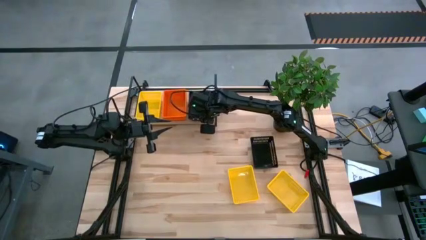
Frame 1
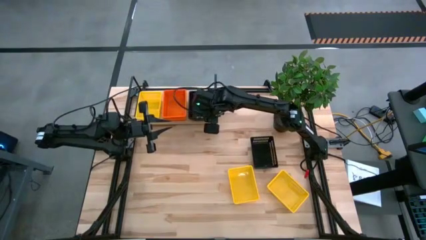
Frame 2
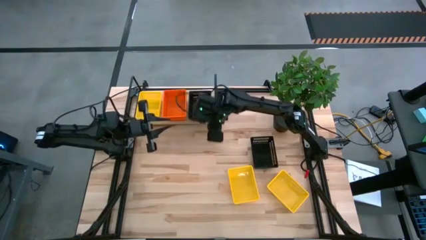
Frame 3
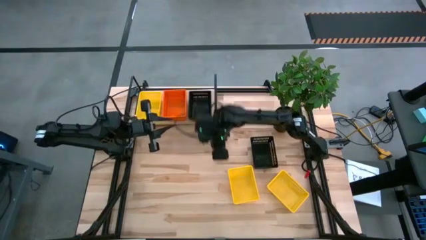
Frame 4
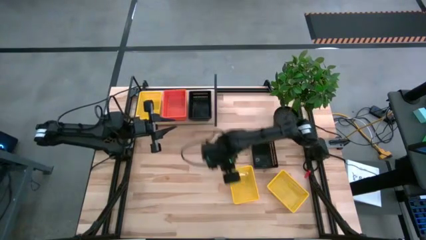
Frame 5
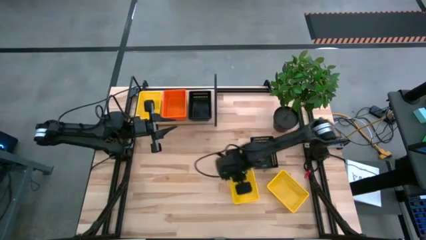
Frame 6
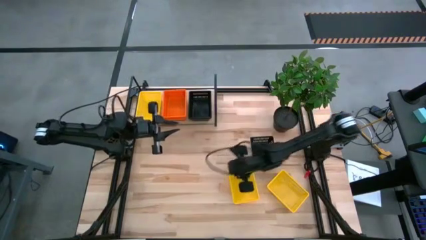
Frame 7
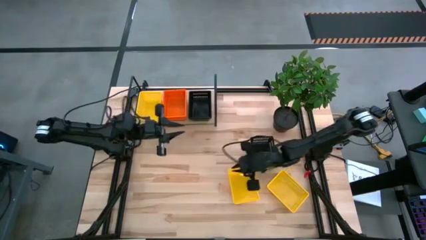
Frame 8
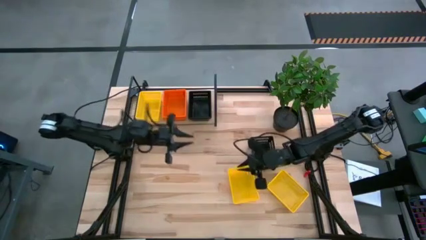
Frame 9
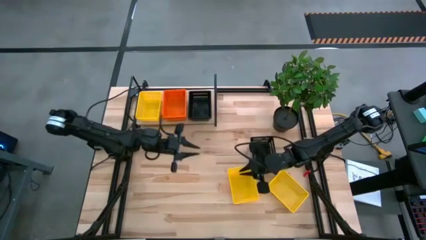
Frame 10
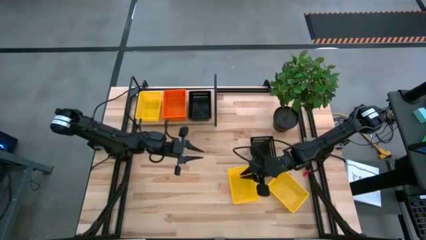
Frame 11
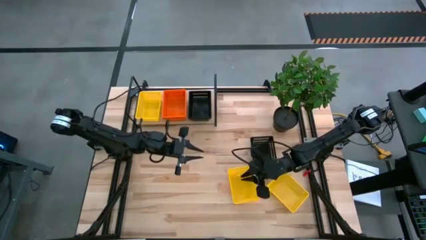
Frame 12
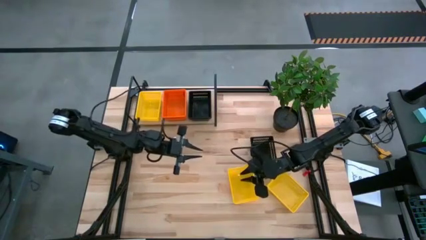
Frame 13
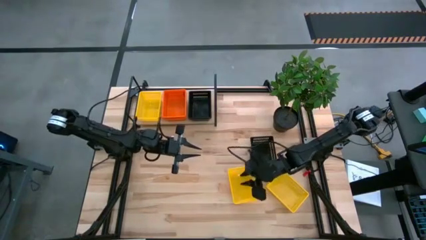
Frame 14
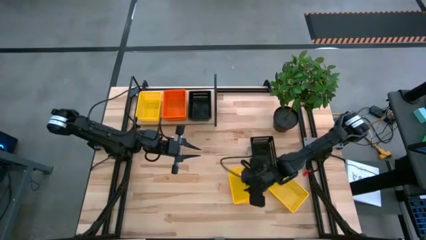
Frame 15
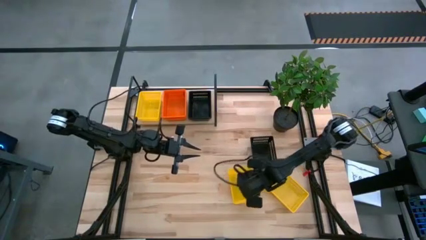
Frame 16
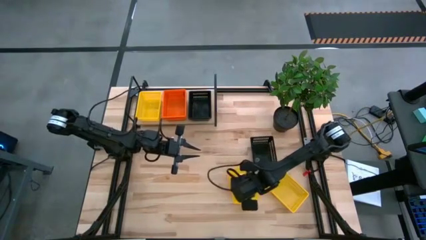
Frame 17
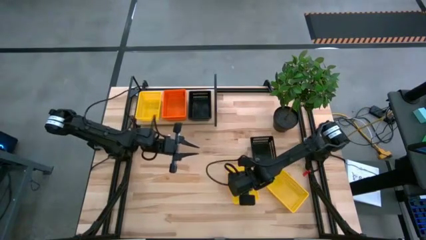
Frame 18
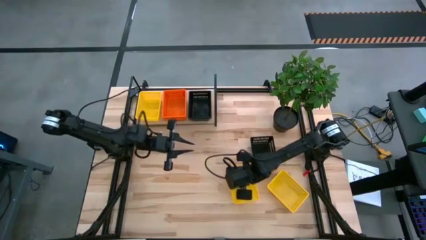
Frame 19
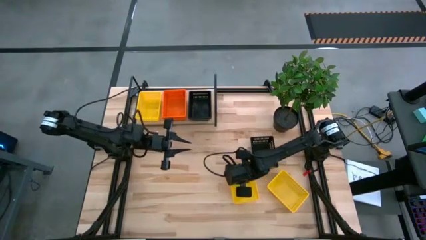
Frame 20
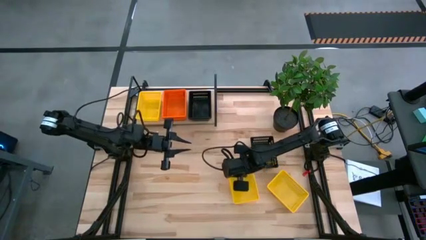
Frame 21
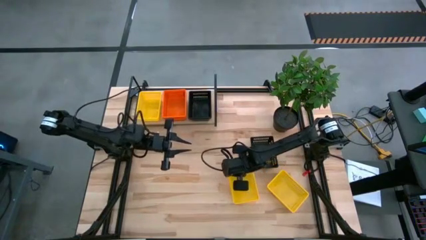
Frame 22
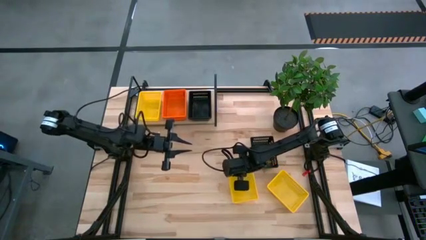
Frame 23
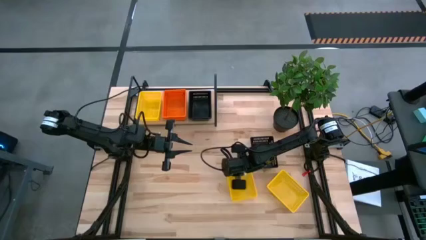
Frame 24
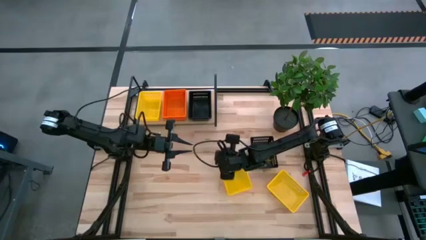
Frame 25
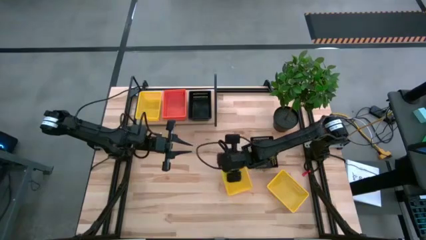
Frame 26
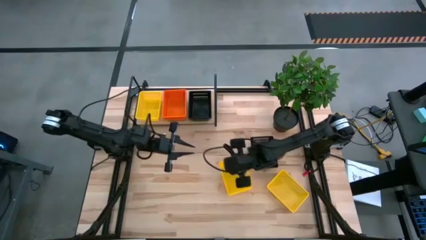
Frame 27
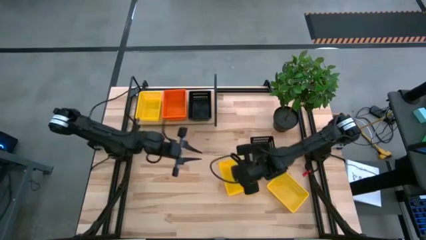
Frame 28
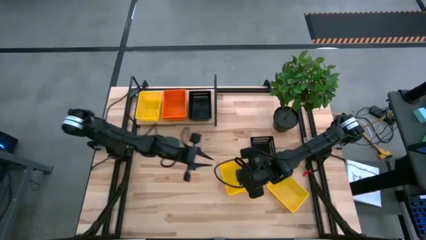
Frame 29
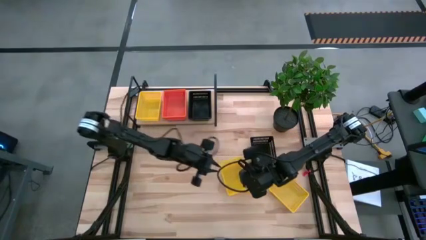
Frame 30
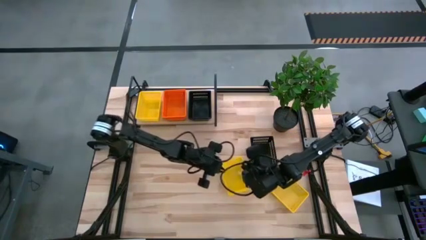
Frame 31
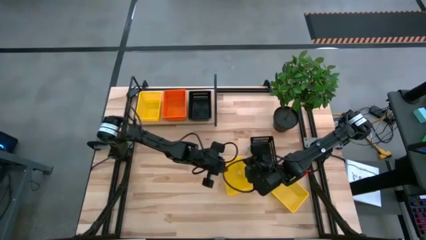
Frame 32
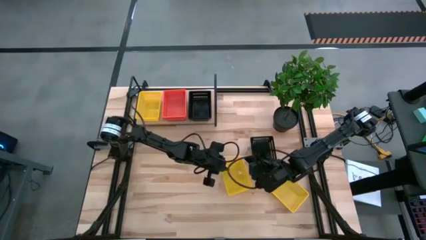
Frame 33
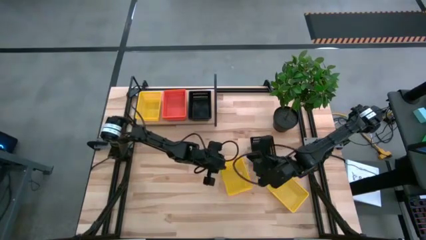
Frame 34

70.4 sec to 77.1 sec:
Task: Stack baskets on shelf by color
Stack the left yellow bin on the yellow bin on the shelf

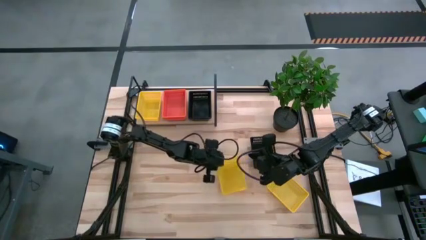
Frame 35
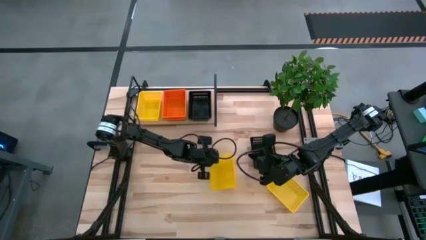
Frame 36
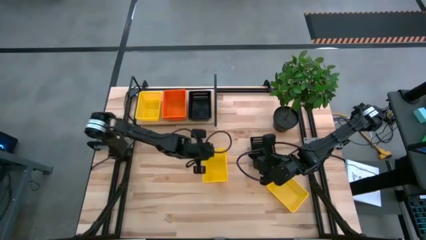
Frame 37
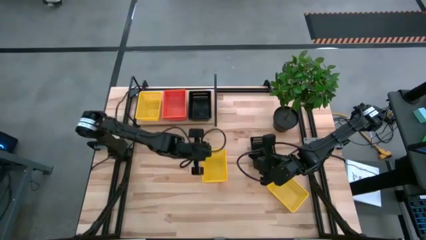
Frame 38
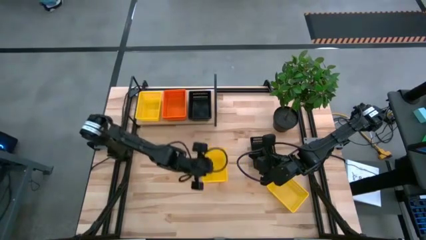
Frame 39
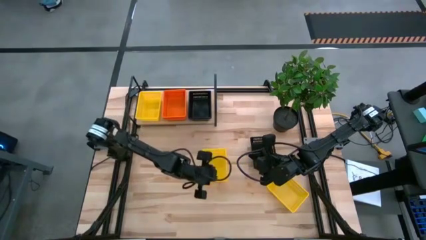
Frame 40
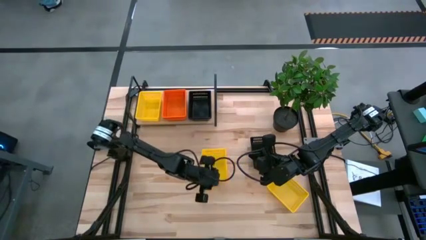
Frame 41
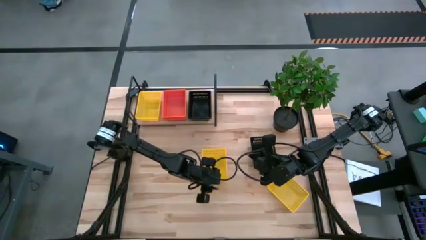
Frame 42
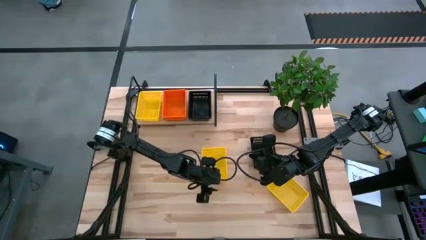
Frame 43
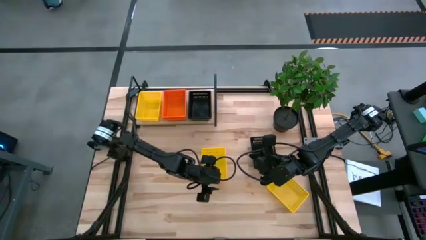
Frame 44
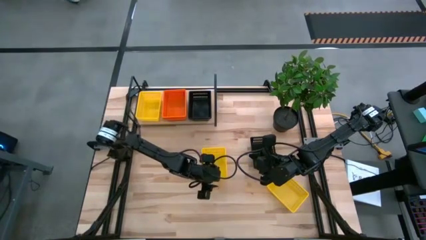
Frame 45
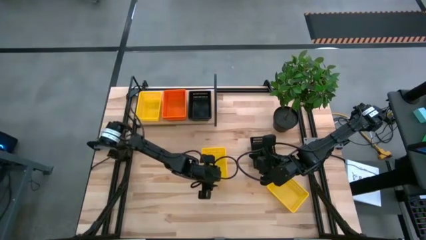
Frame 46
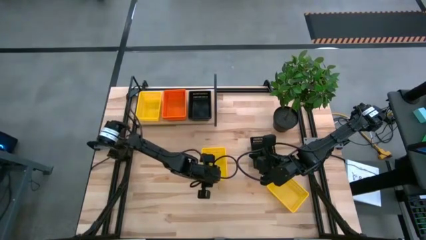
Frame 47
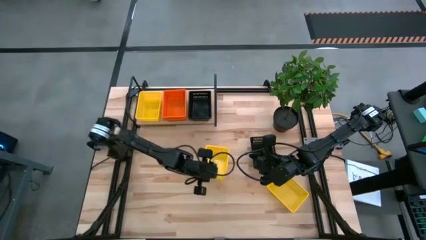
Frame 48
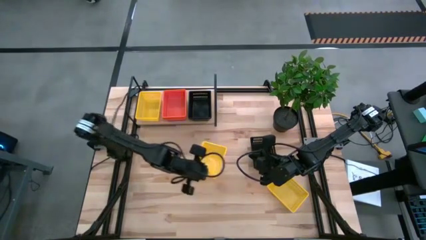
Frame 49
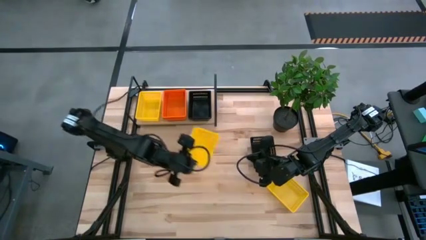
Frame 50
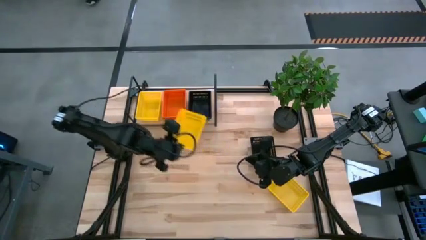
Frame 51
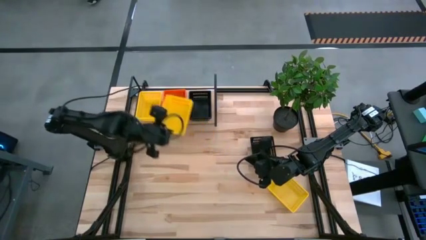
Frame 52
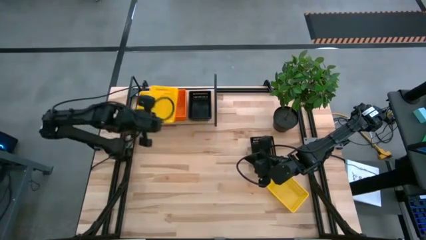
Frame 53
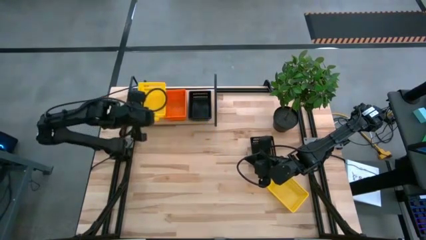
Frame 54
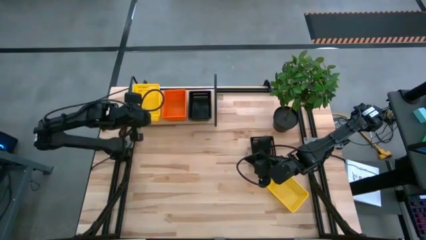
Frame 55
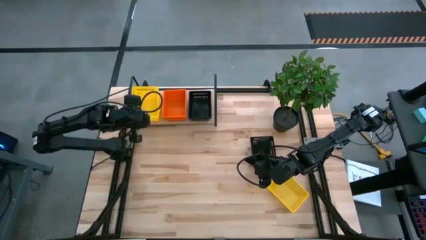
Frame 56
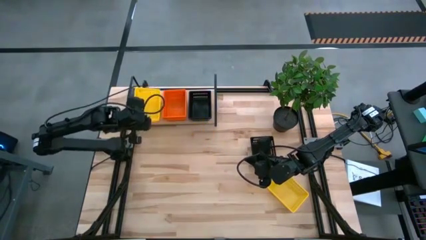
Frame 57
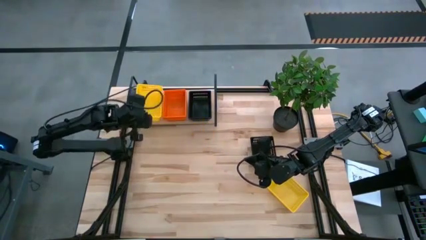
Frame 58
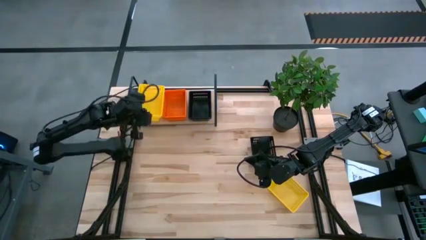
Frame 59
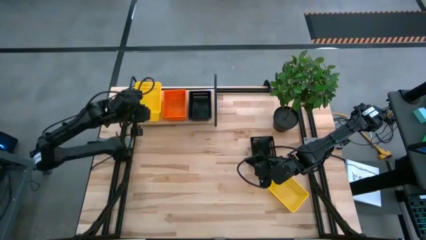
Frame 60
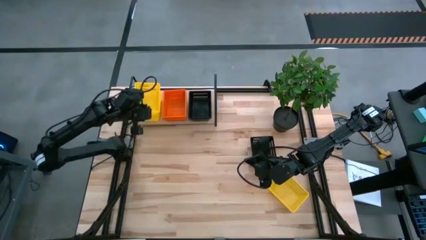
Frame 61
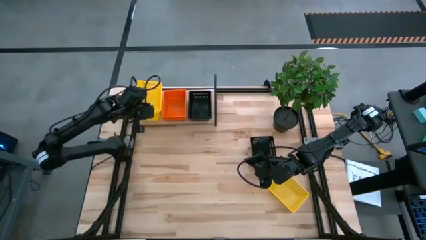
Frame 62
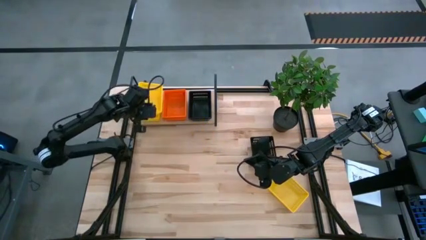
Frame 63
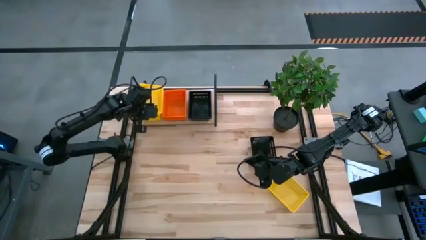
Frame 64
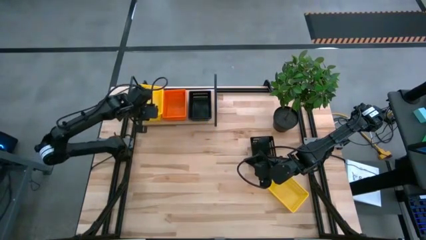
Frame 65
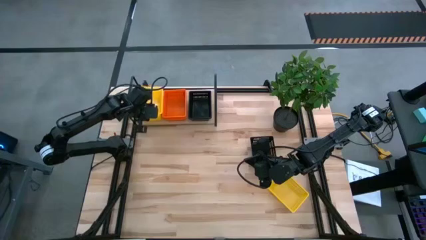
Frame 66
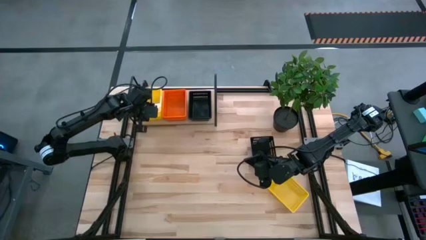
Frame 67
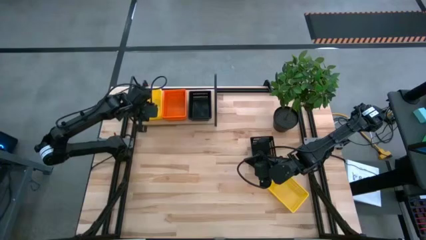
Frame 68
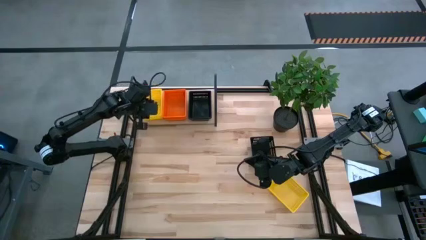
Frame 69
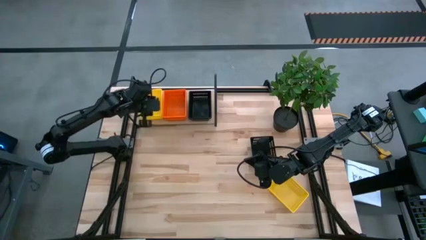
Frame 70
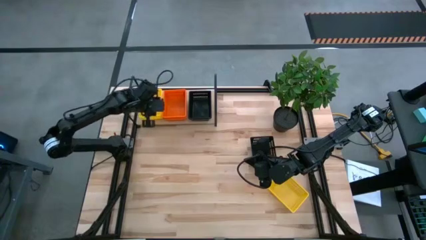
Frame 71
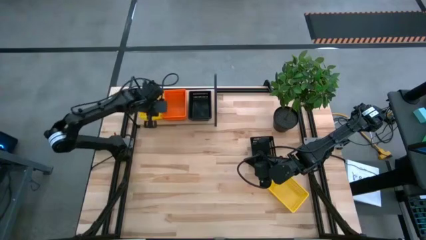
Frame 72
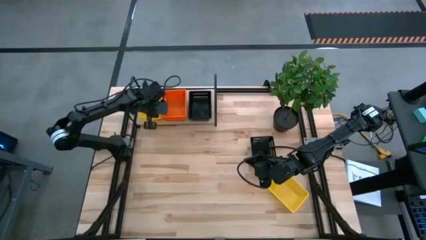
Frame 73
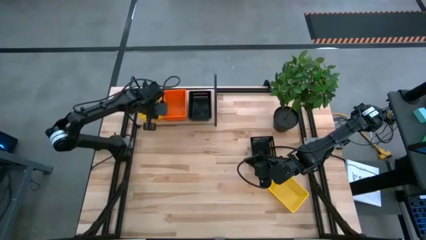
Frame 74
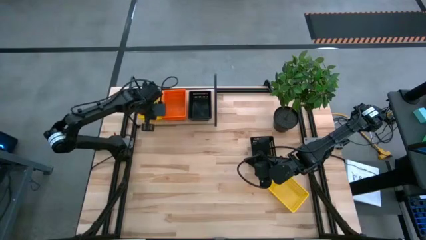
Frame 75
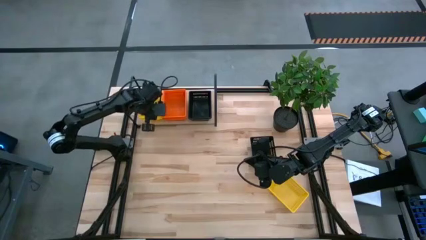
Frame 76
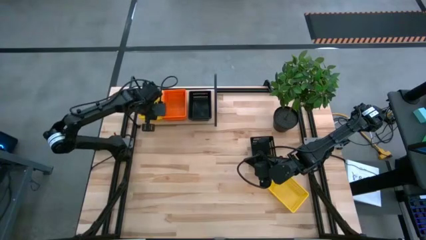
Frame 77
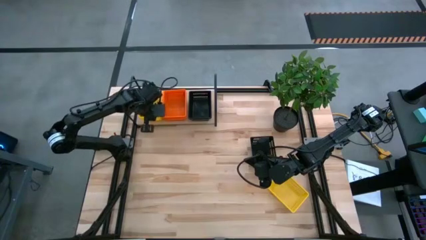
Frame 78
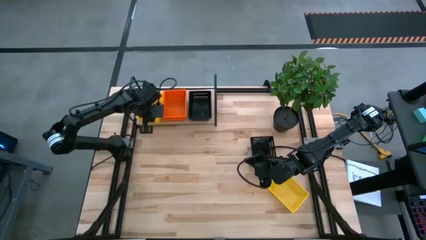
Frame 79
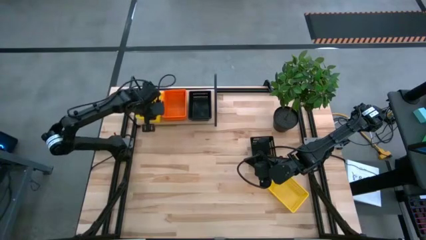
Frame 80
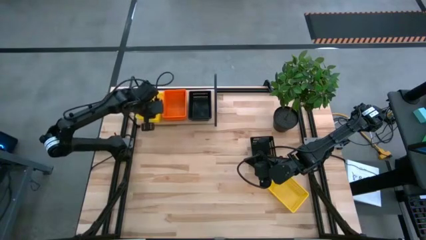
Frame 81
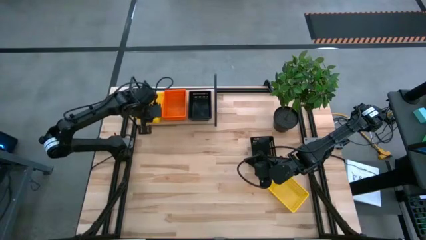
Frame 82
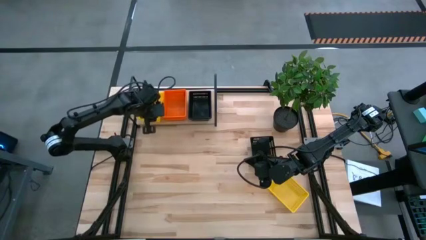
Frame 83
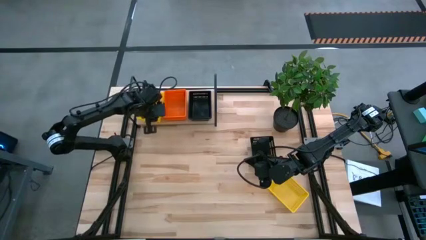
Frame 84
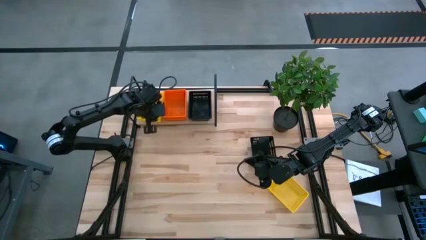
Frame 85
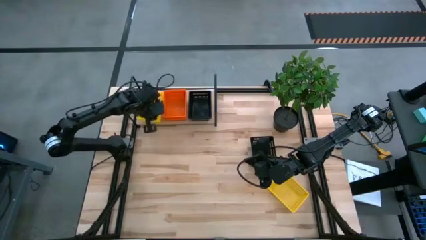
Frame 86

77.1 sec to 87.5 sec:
Stack the left yellow bin on the yellow bin on the shelf
